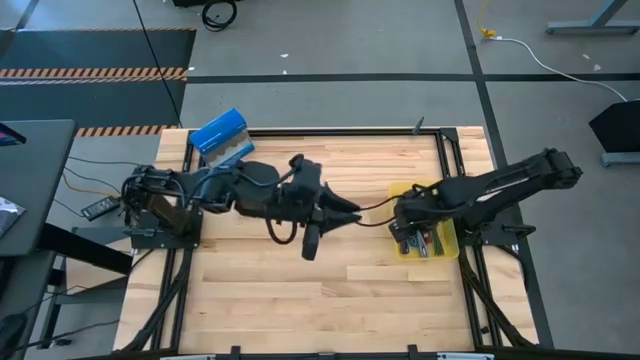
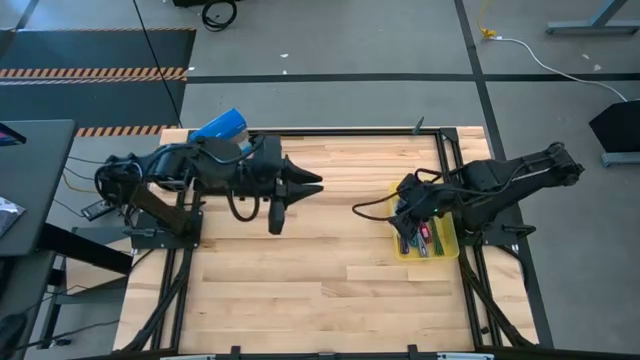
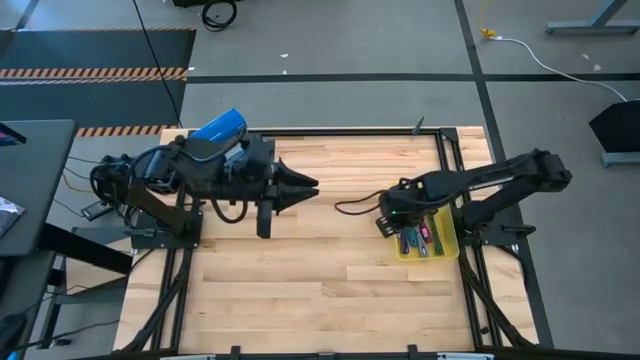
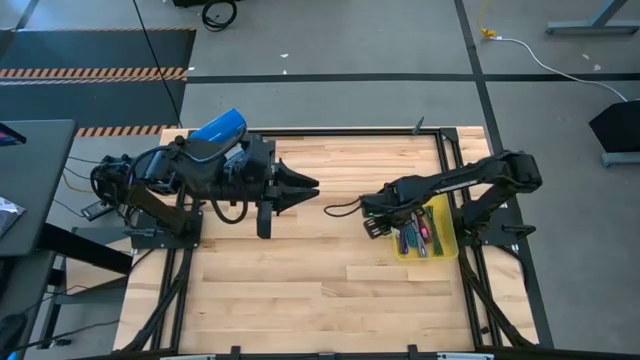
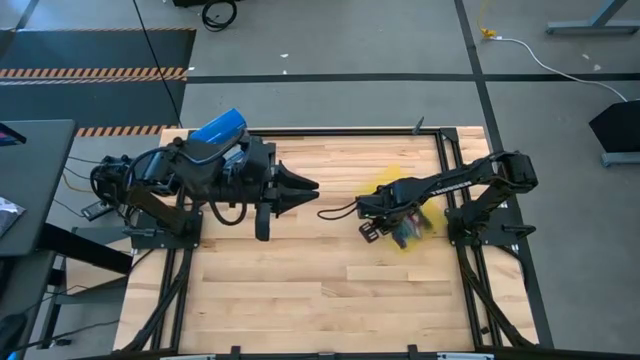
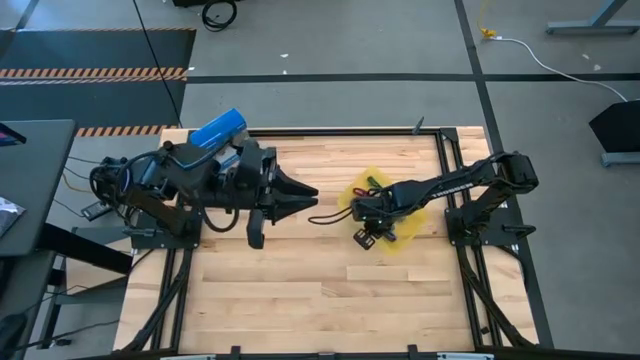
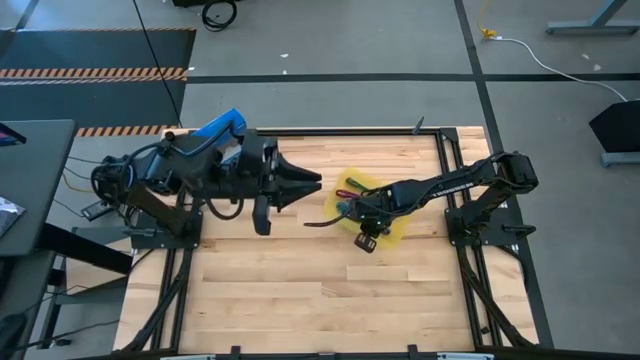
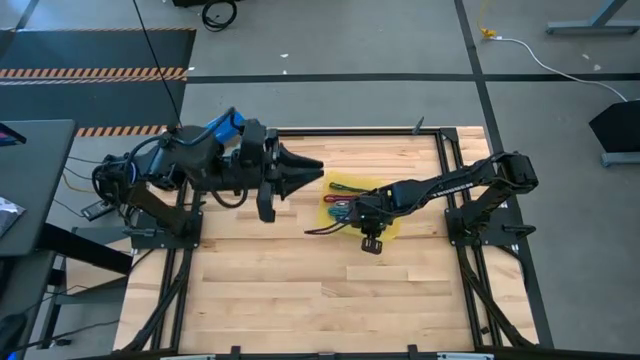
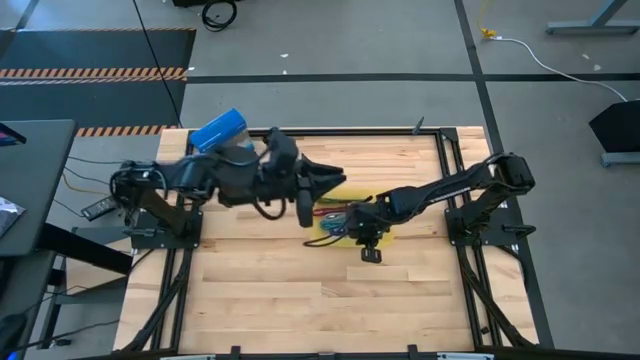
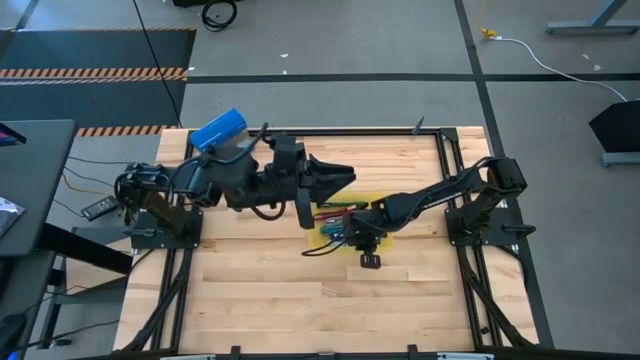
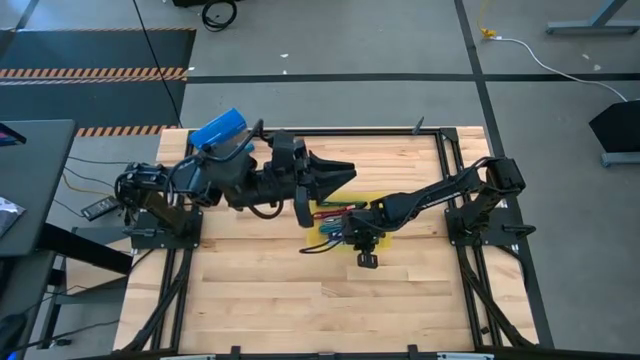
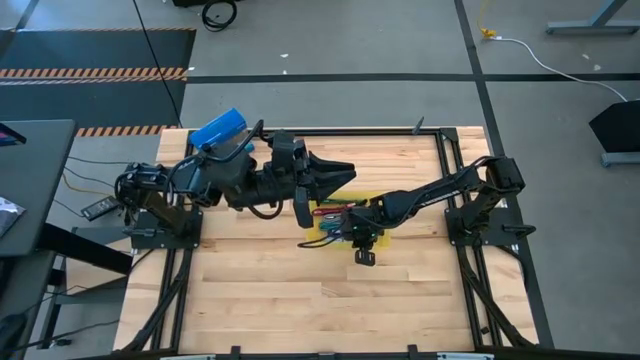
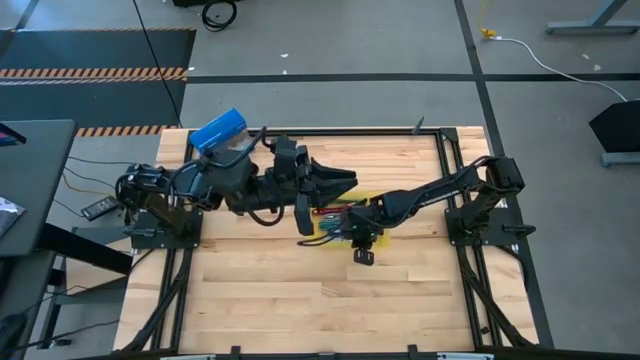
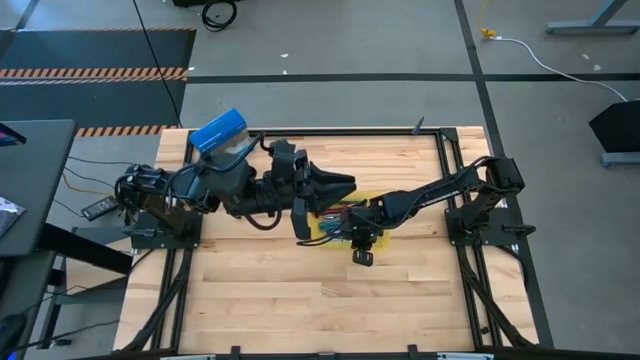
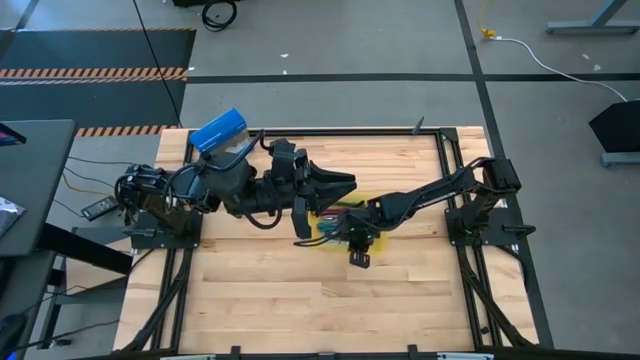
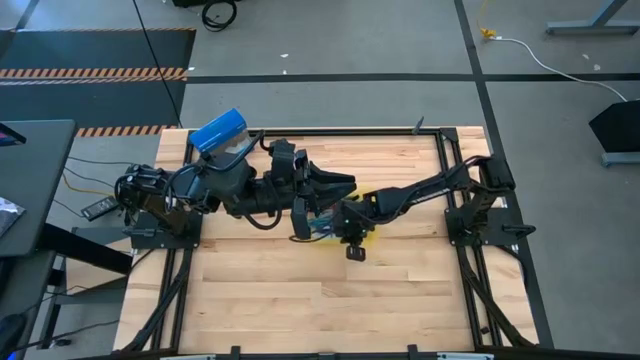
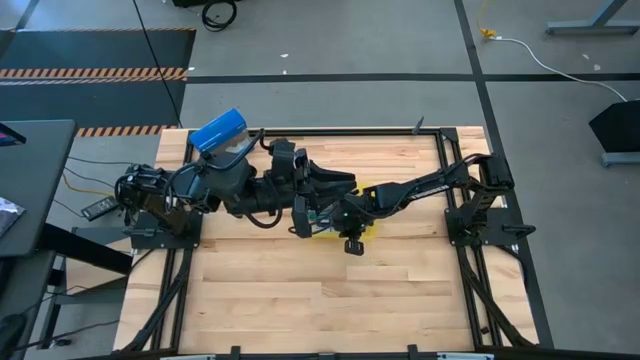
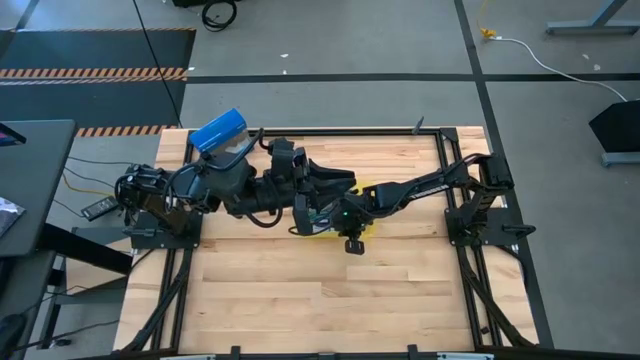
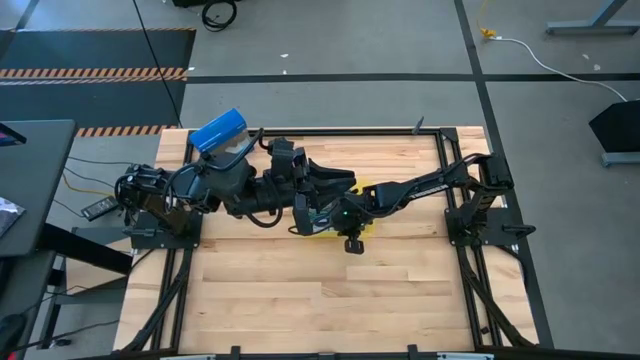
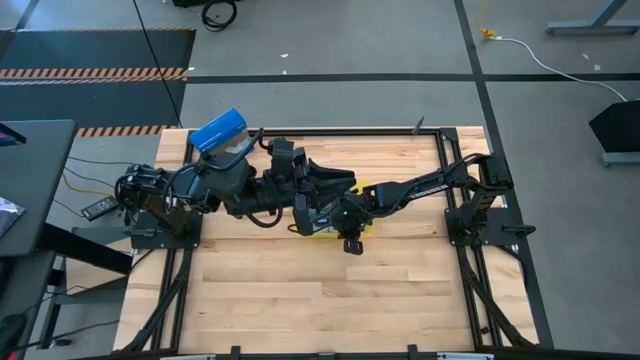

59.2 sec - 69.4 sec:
Task: Pick and place USB-C Cables
Move the yellow container to the center of the table

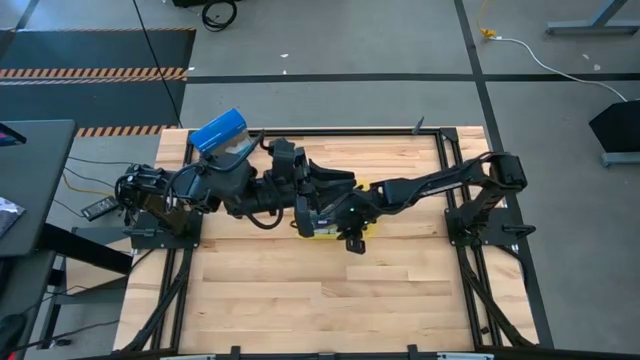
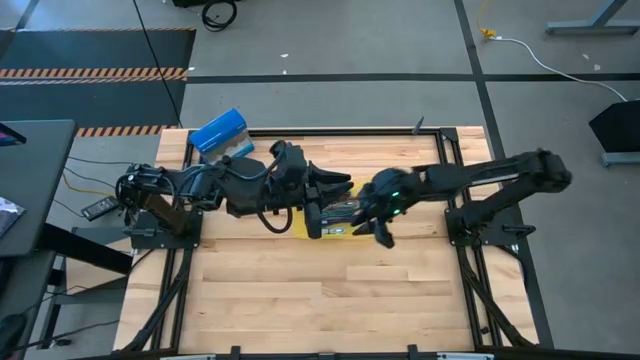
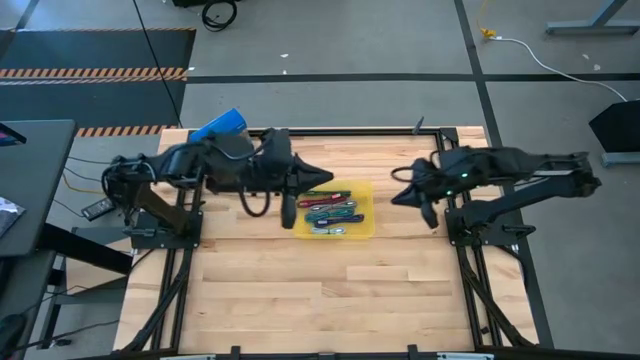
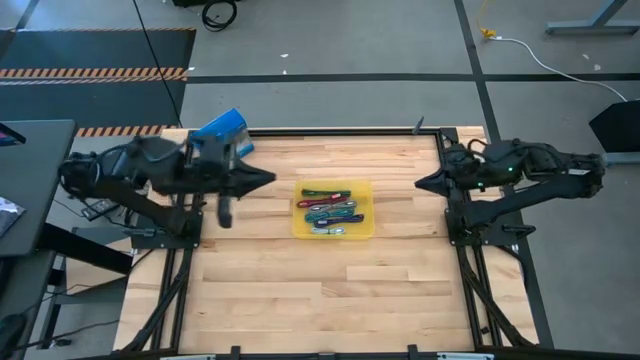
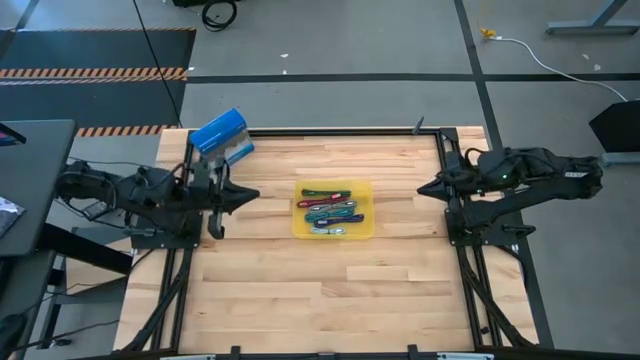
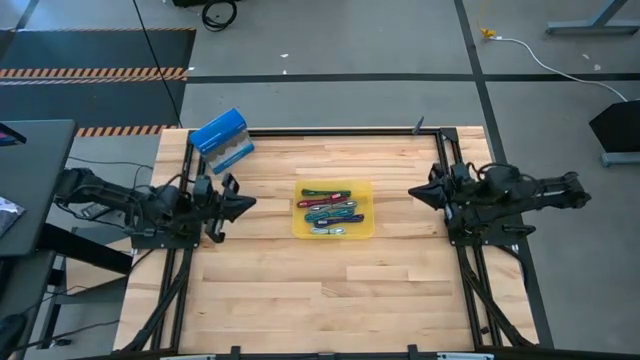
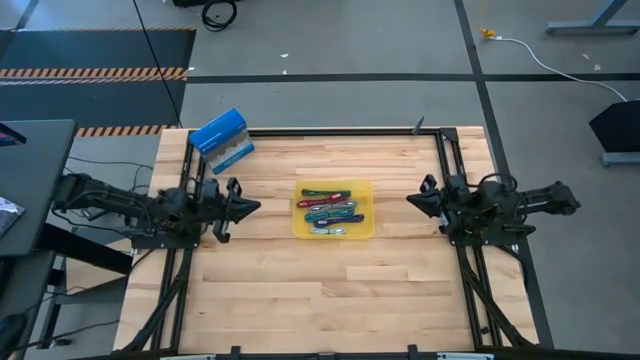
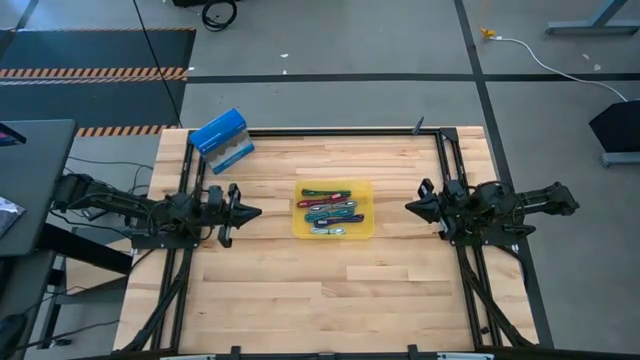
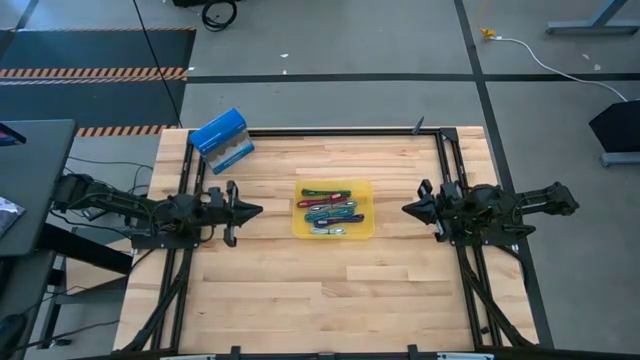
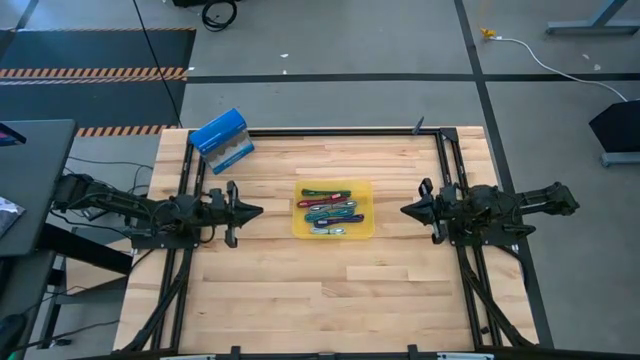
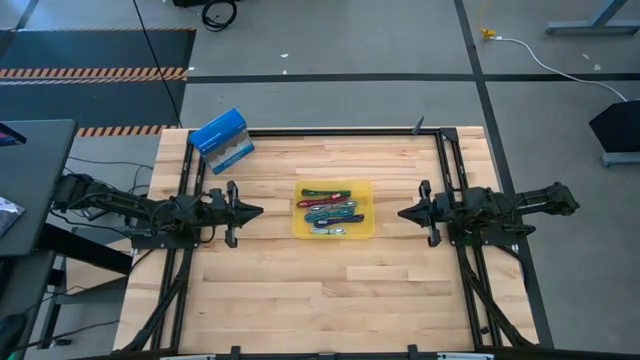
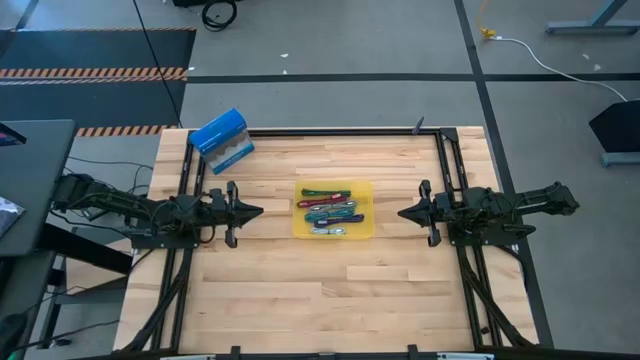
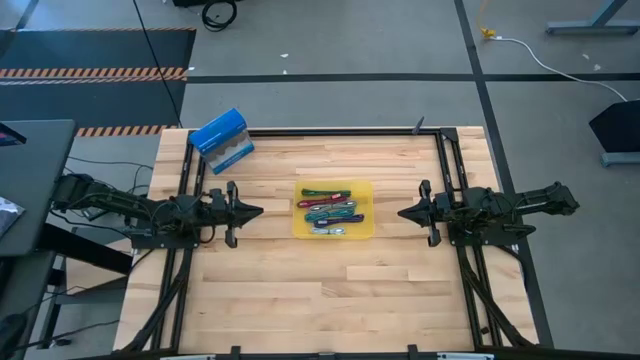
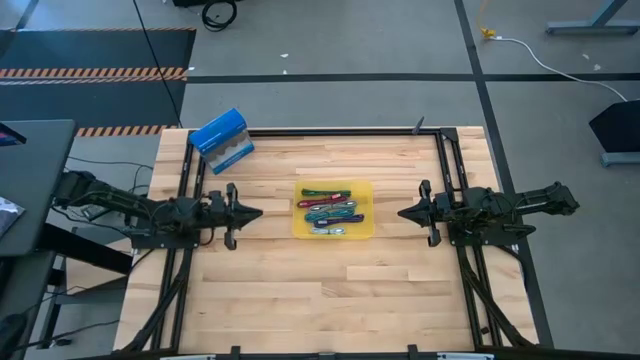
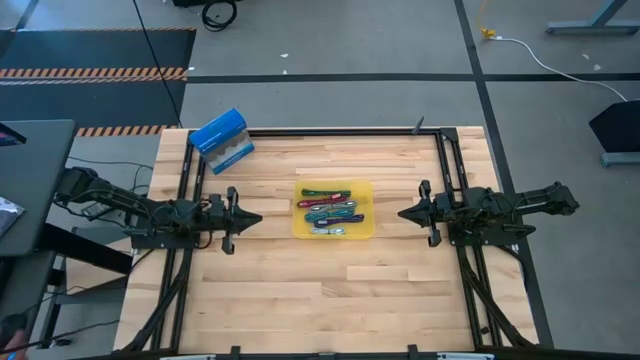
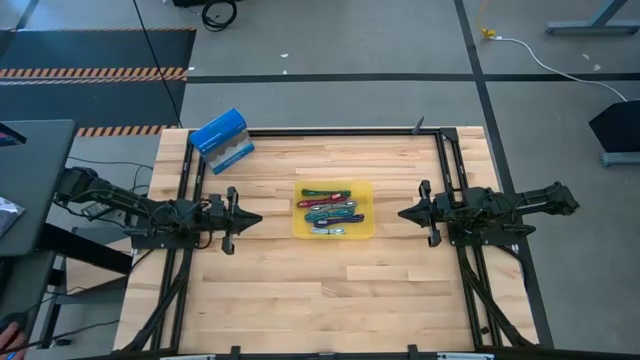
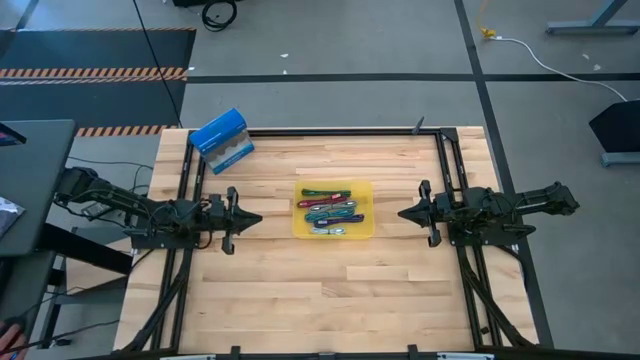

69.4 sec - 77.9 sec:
Return to Home Position

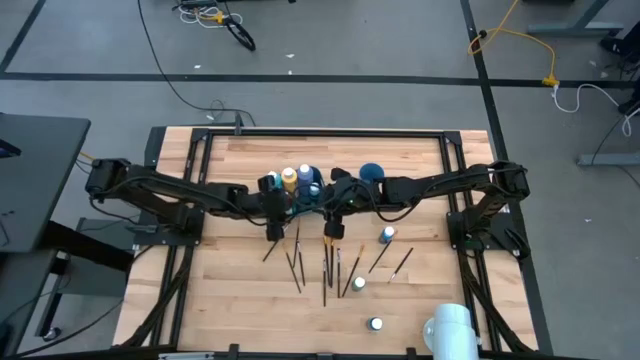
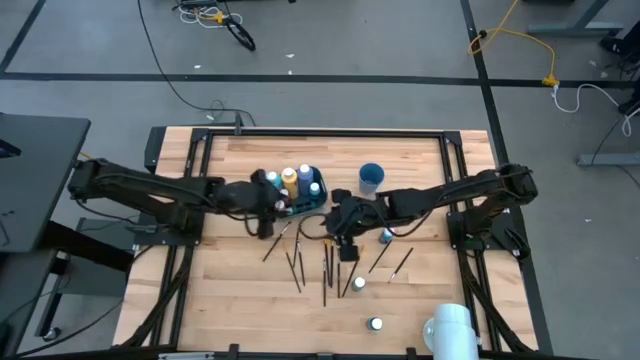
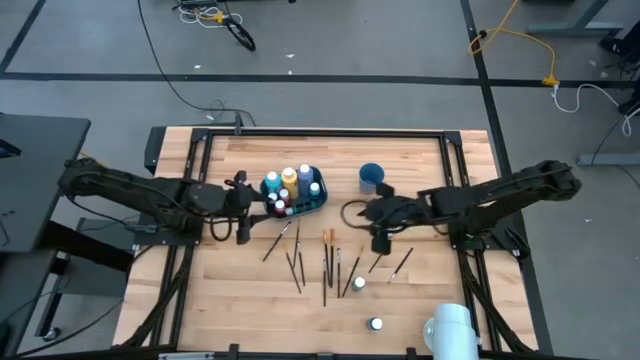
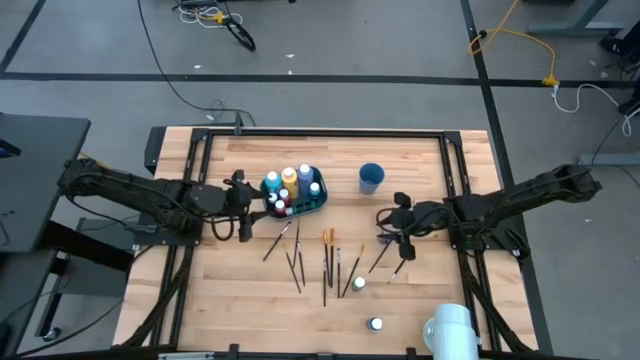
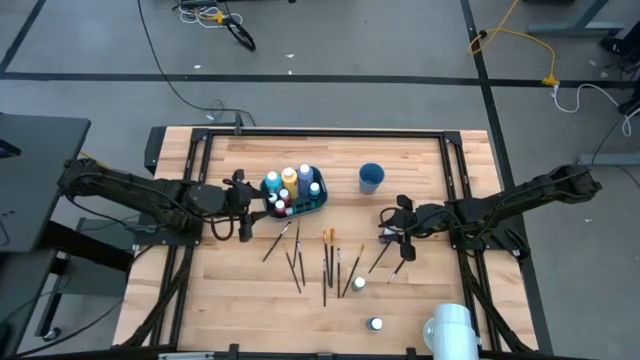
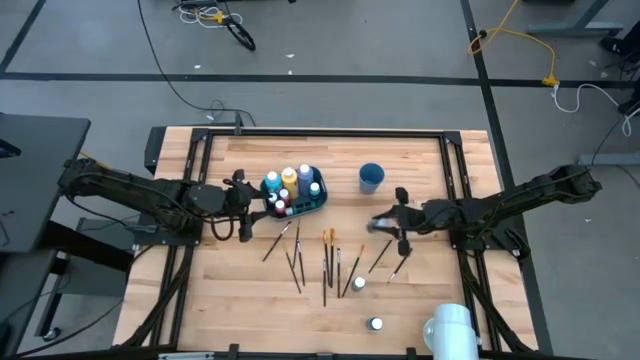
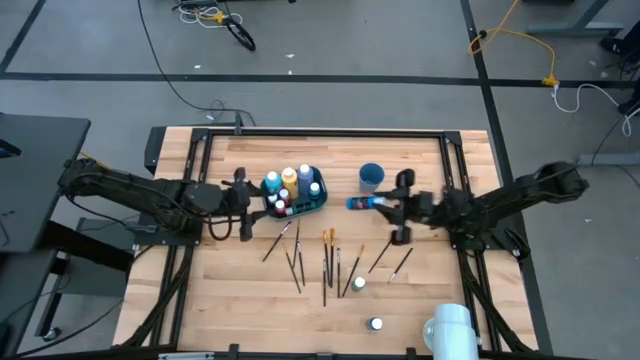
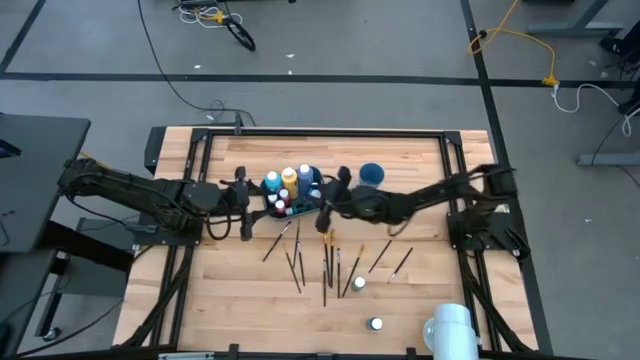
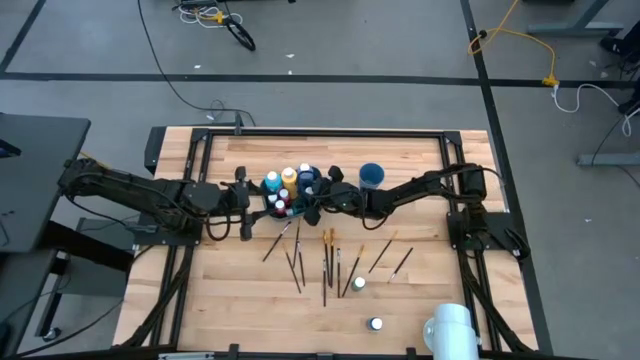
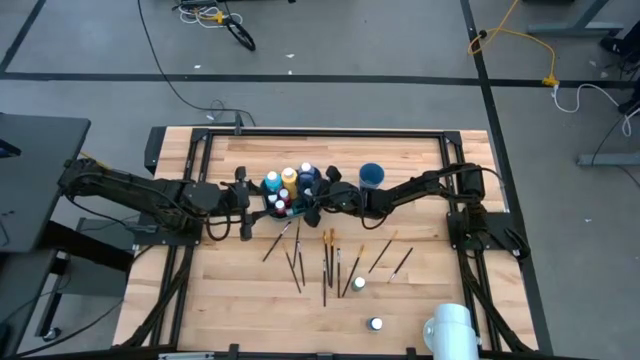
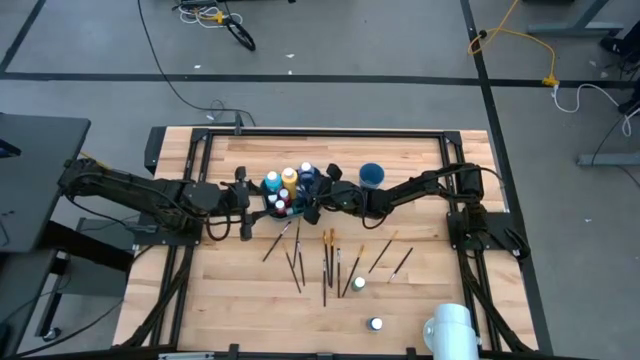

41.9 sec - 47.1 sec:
Task: Pick & Place Paint Supplies
Put the small blue paint bottle into the blue bin
